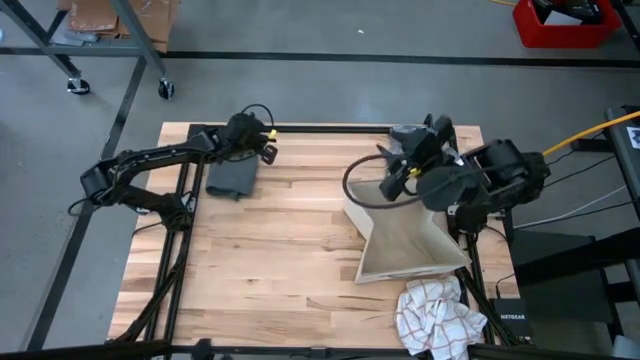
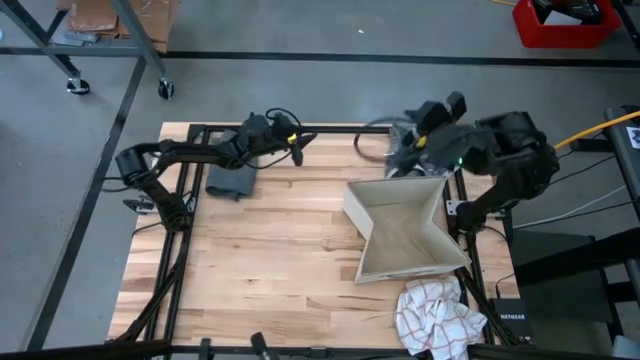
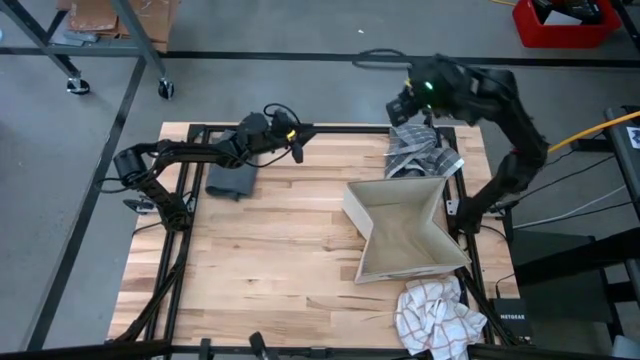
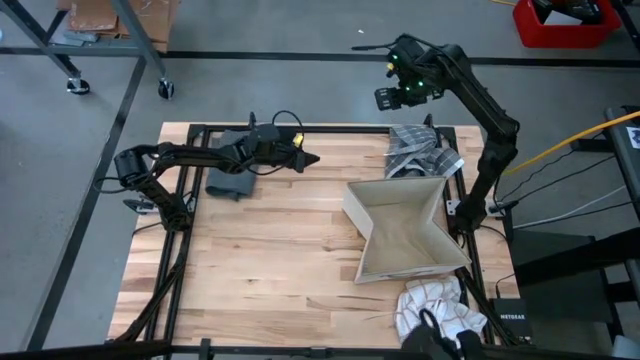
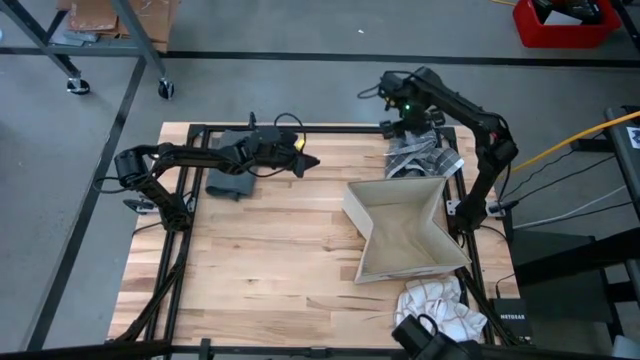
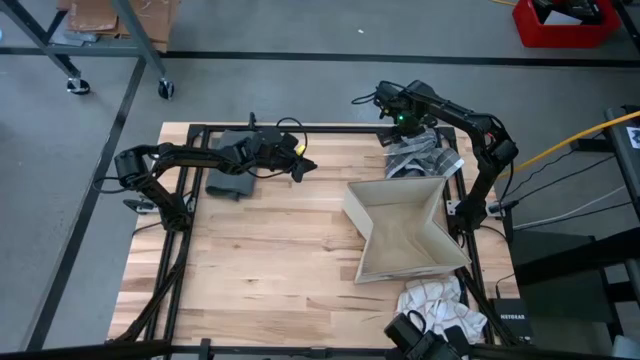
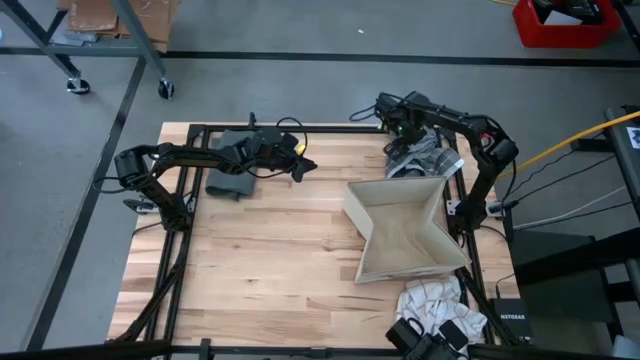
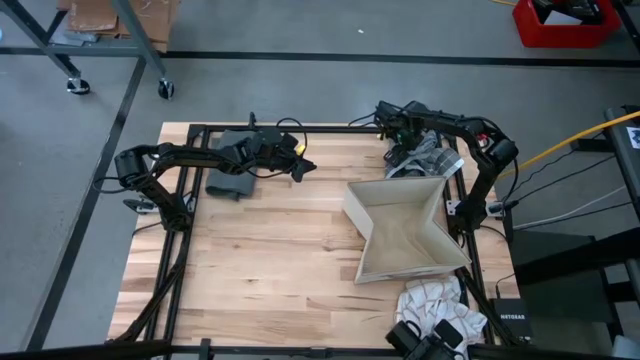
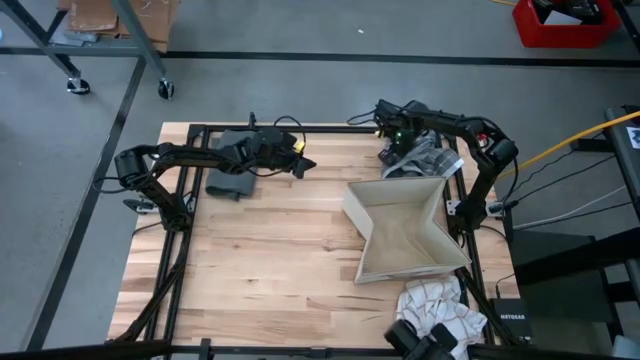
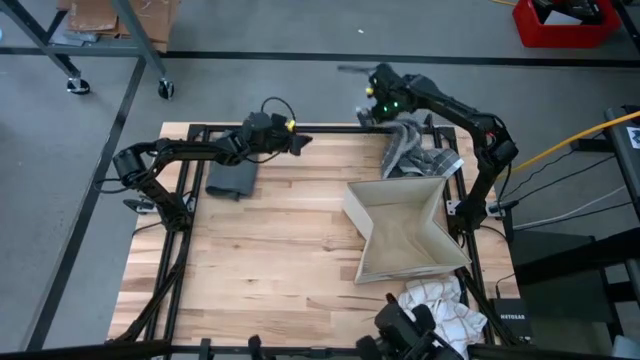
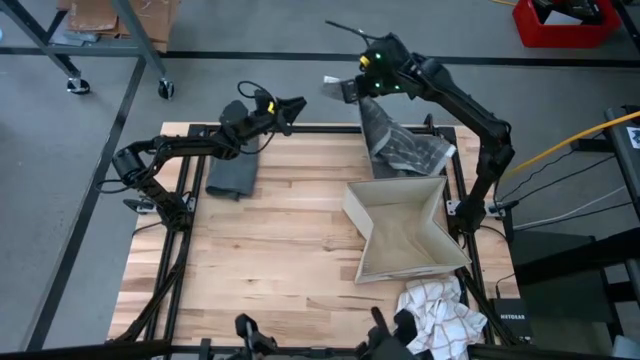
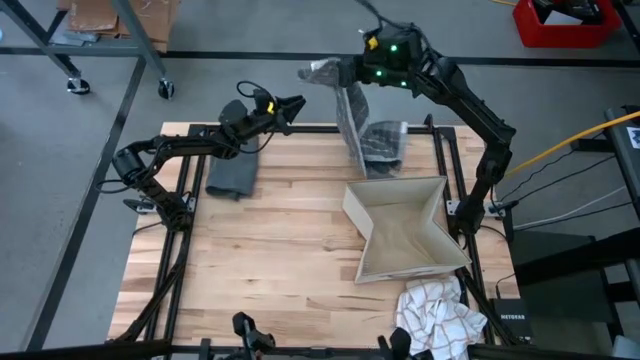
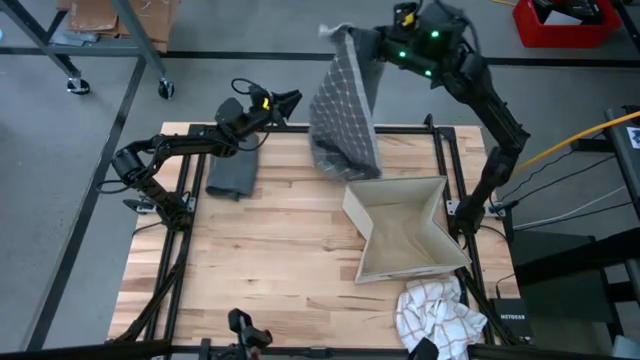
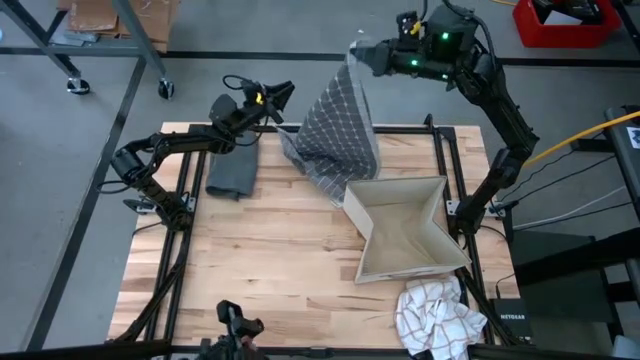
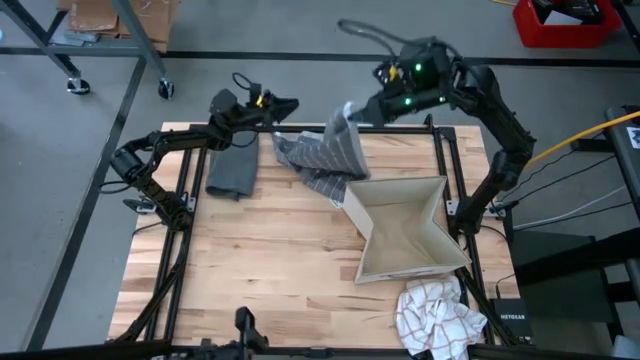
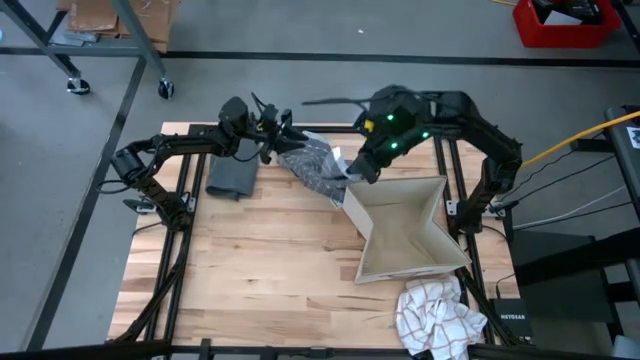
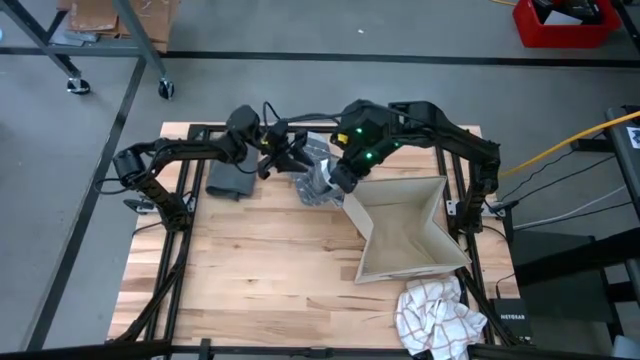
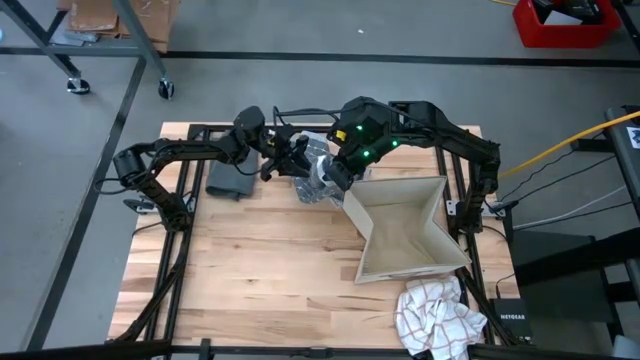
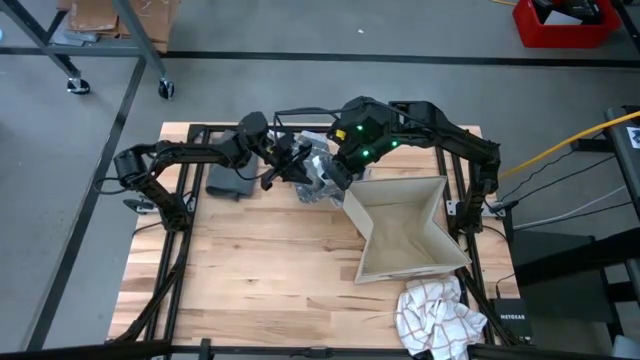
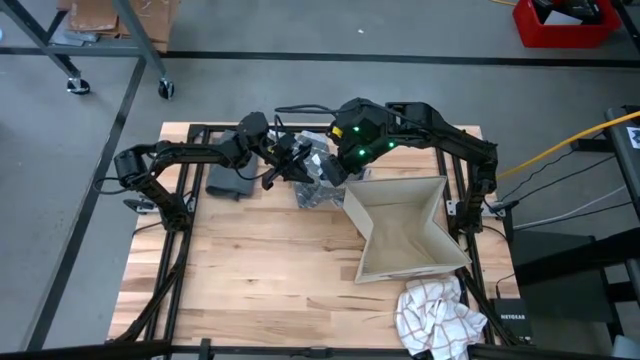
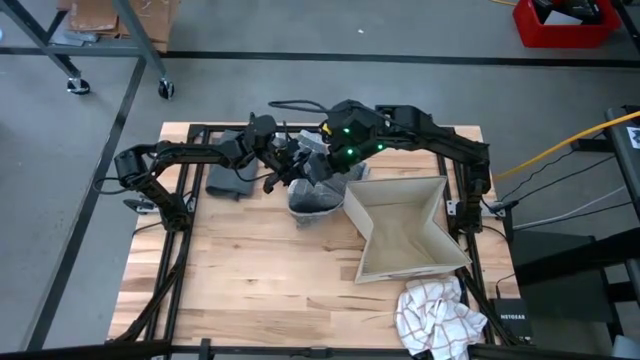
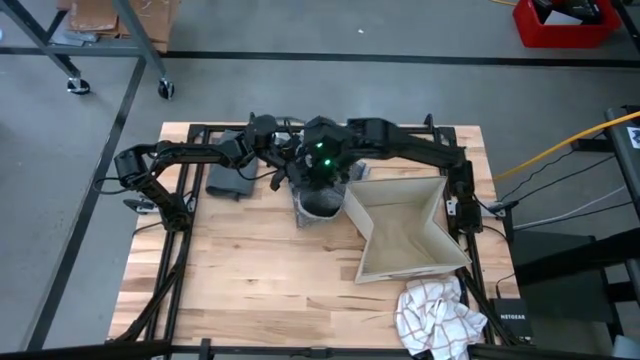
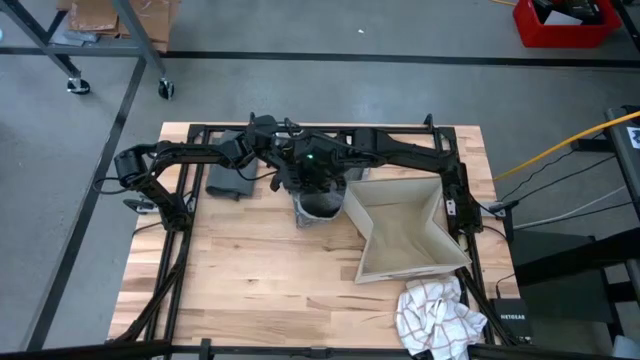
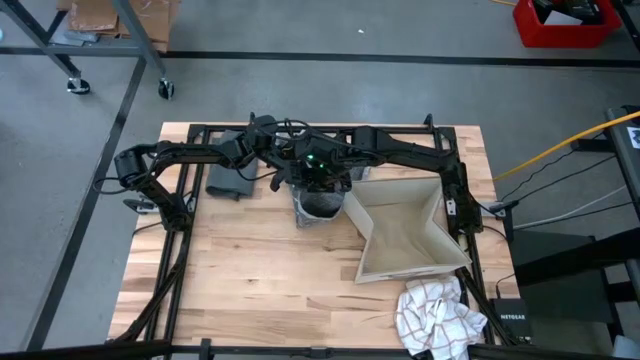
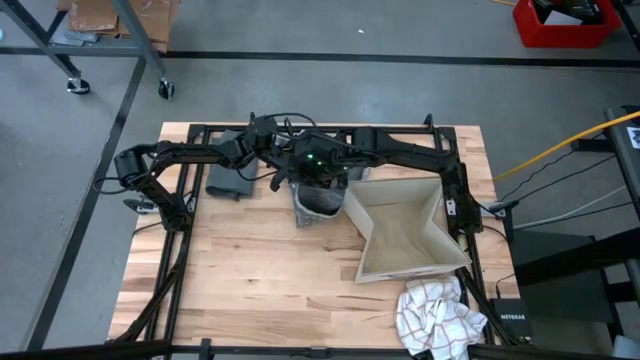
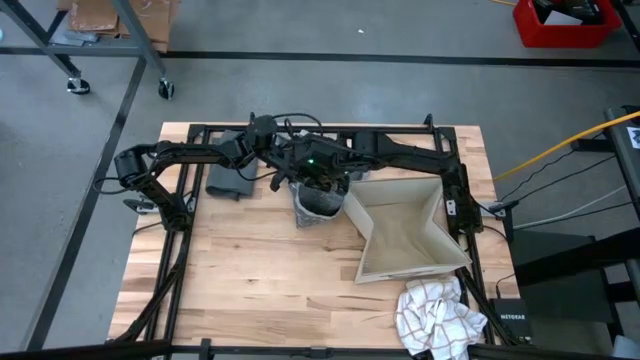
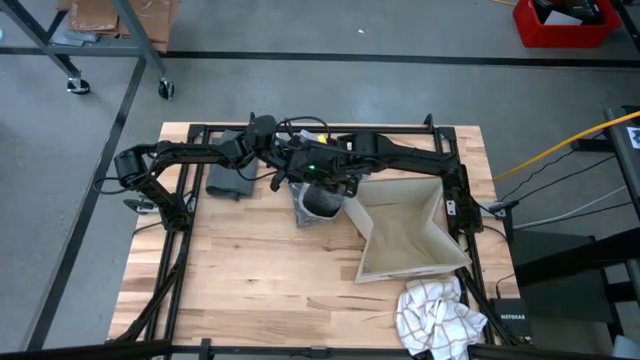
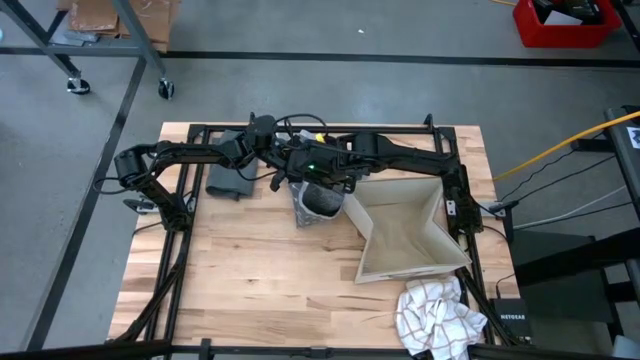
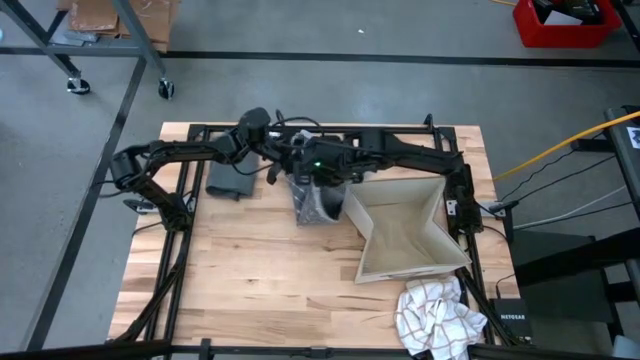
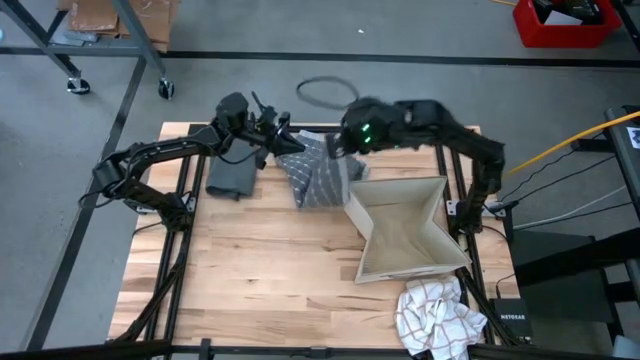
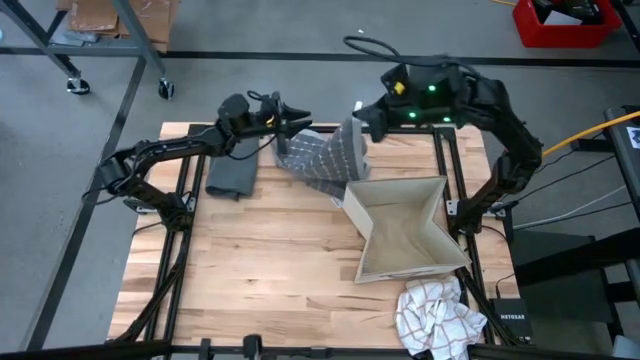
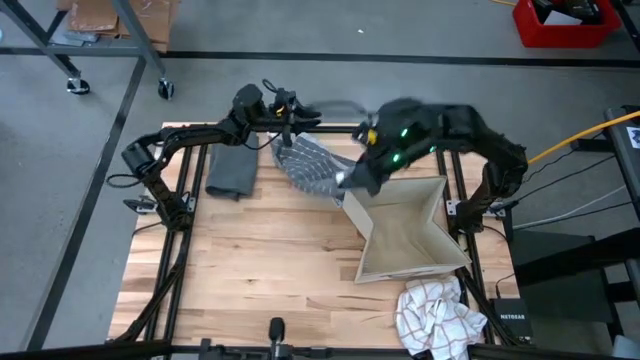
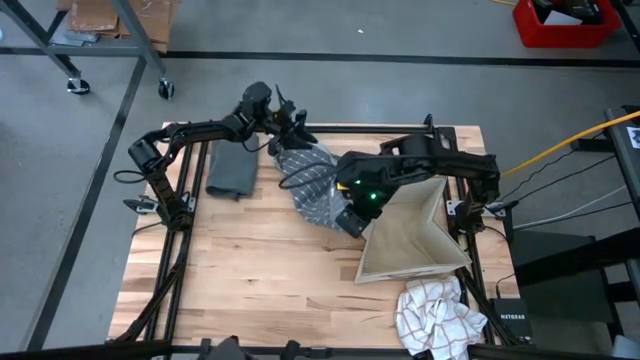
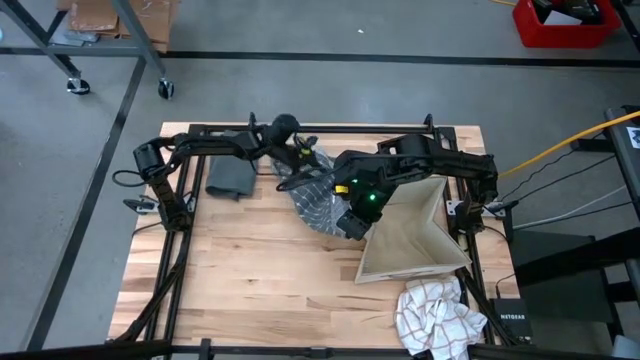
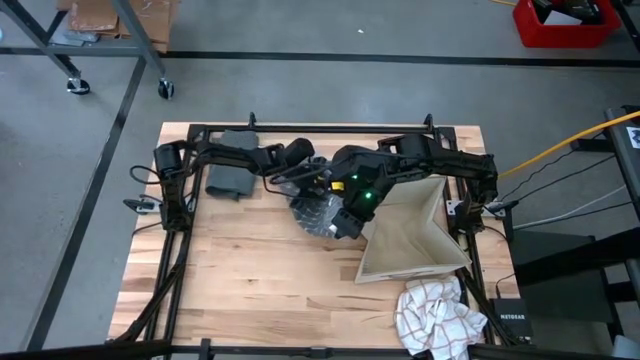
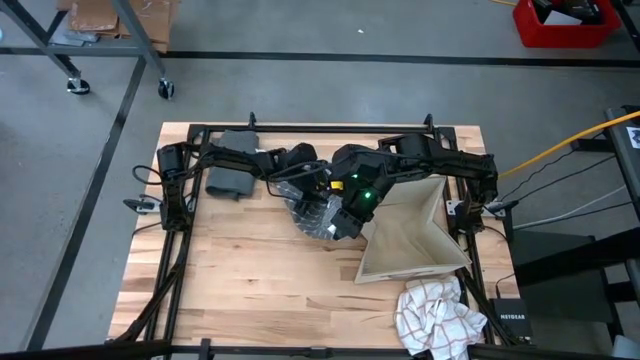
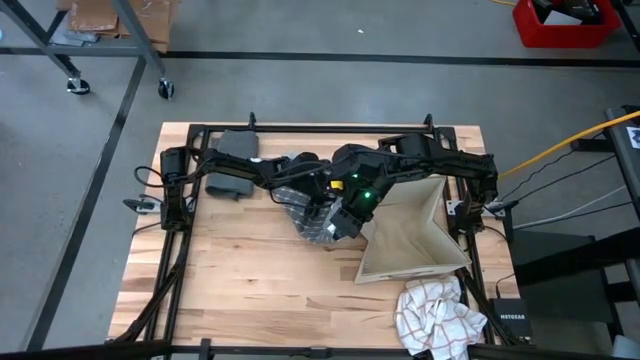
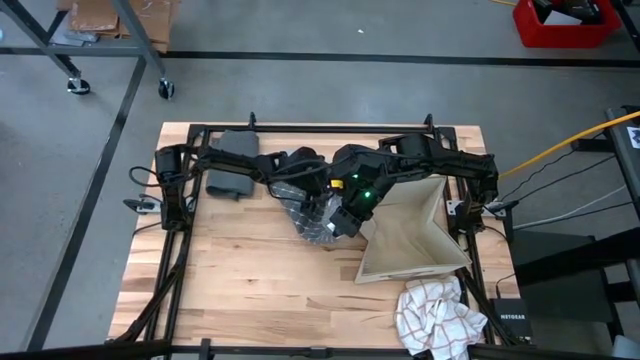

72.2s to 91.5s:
Task: Fold towel
Fold the gray patterned towel
